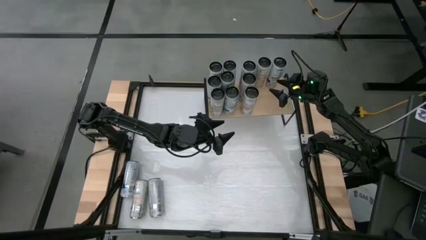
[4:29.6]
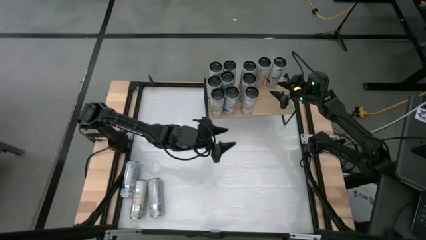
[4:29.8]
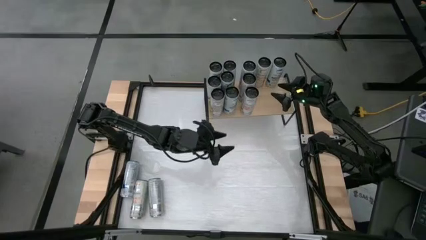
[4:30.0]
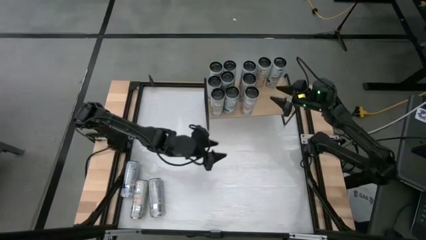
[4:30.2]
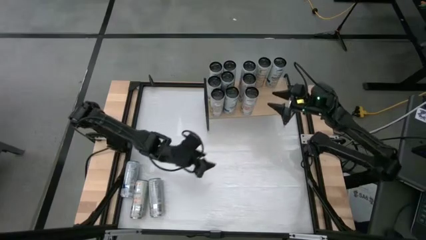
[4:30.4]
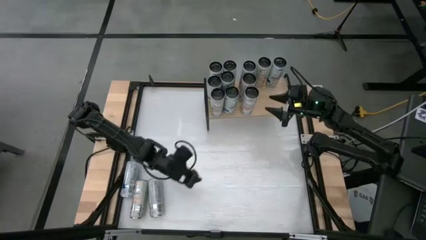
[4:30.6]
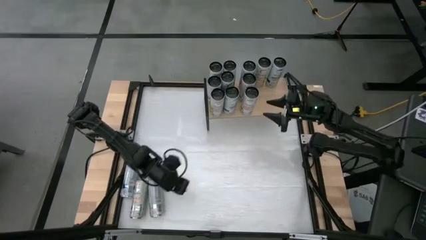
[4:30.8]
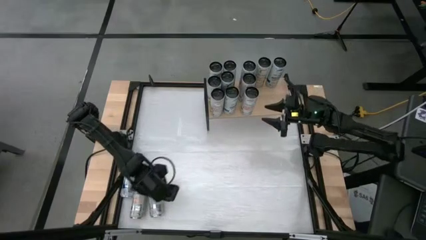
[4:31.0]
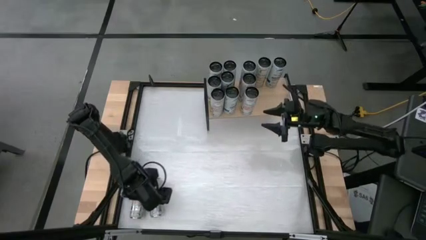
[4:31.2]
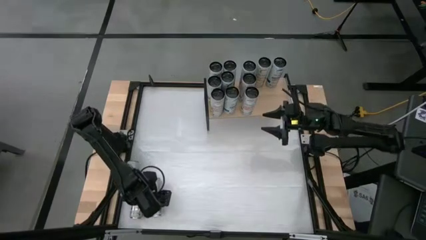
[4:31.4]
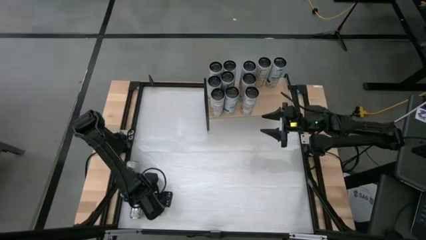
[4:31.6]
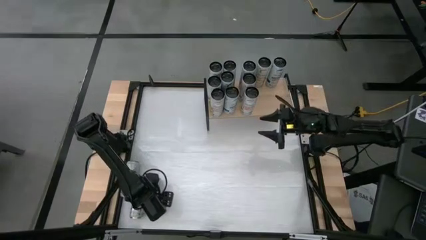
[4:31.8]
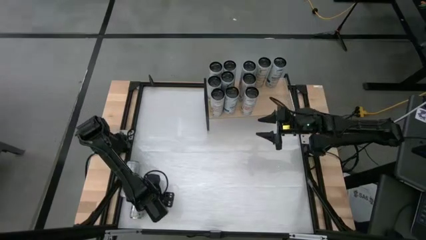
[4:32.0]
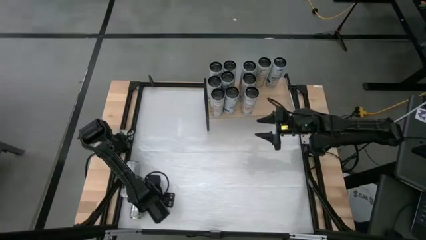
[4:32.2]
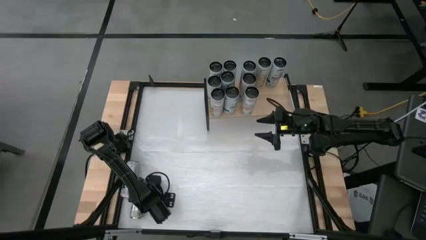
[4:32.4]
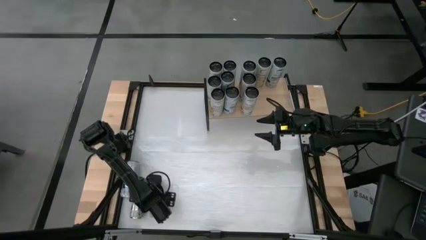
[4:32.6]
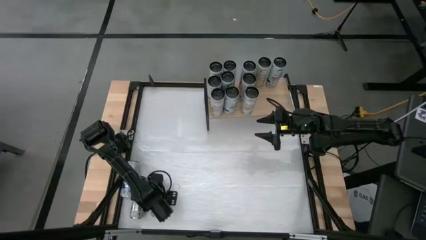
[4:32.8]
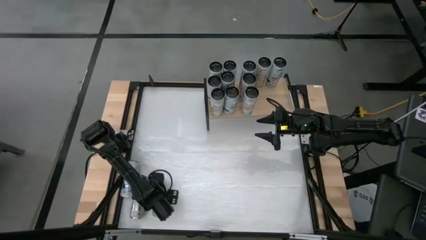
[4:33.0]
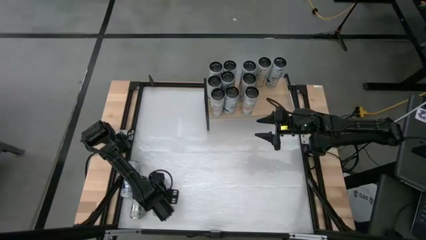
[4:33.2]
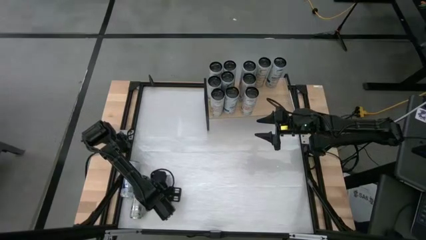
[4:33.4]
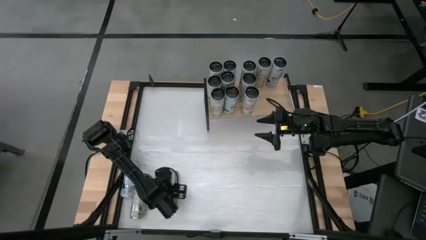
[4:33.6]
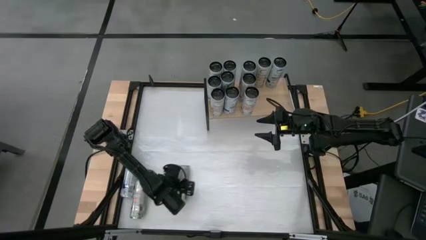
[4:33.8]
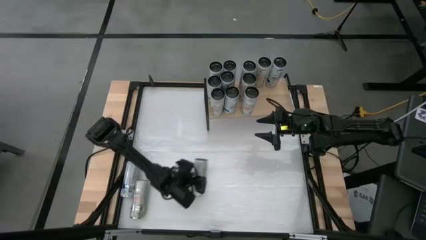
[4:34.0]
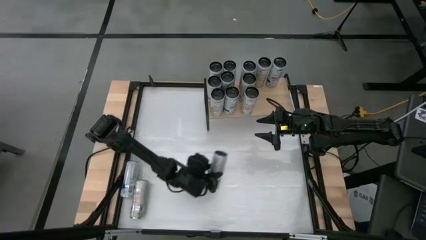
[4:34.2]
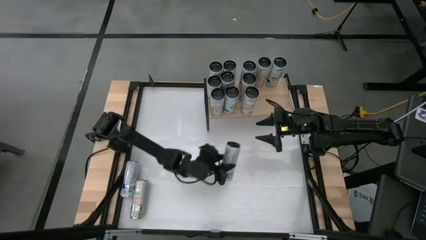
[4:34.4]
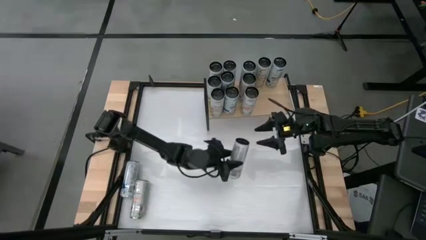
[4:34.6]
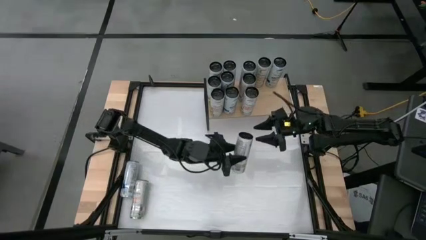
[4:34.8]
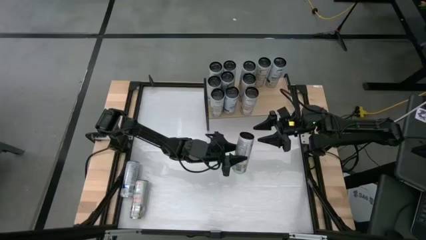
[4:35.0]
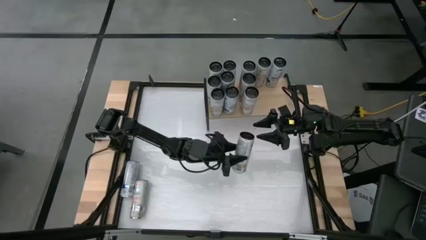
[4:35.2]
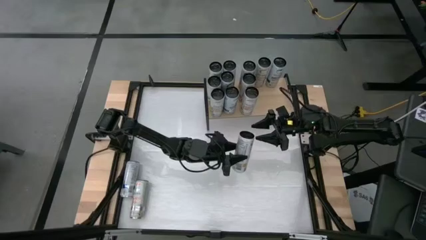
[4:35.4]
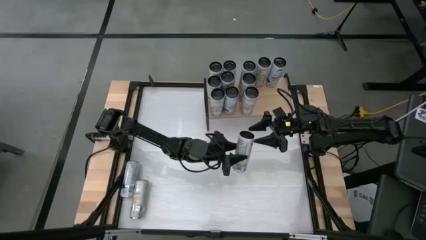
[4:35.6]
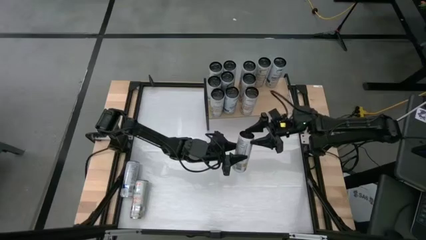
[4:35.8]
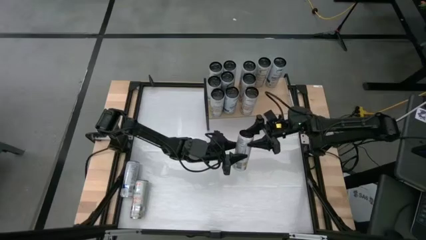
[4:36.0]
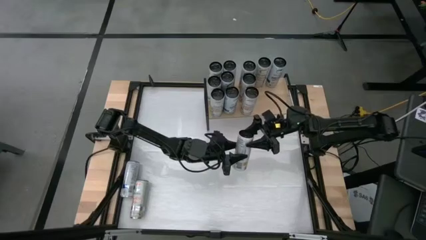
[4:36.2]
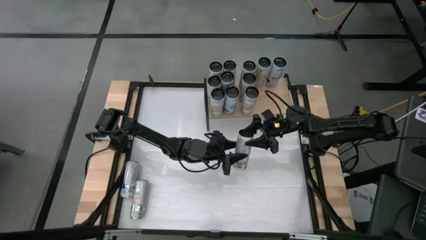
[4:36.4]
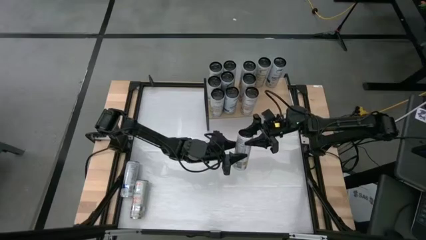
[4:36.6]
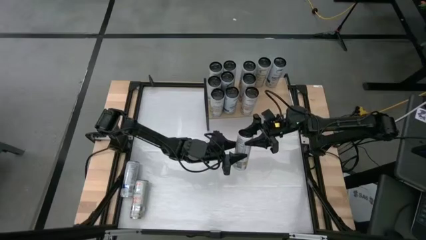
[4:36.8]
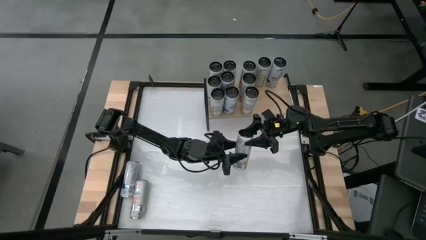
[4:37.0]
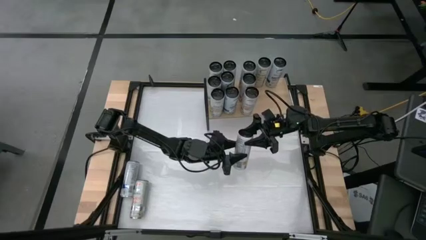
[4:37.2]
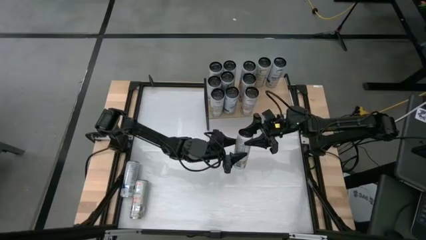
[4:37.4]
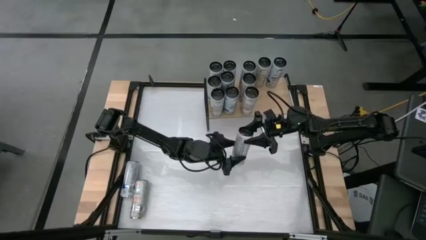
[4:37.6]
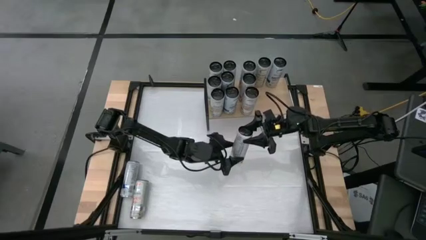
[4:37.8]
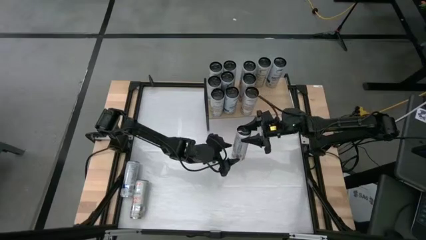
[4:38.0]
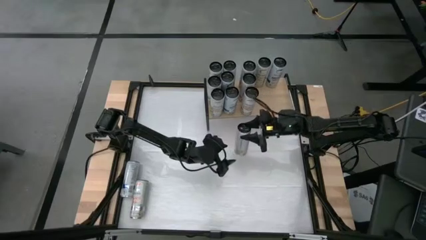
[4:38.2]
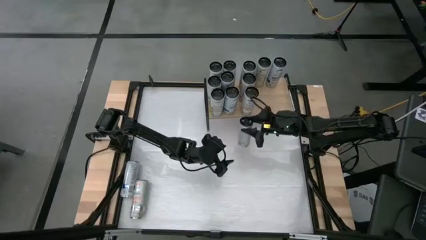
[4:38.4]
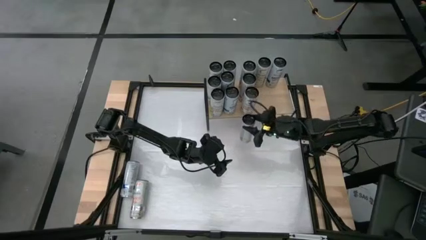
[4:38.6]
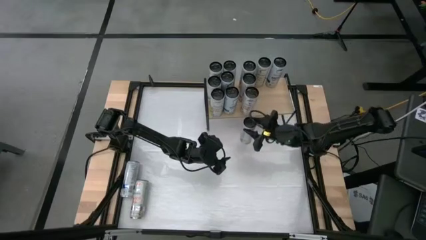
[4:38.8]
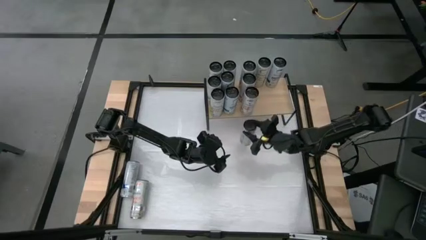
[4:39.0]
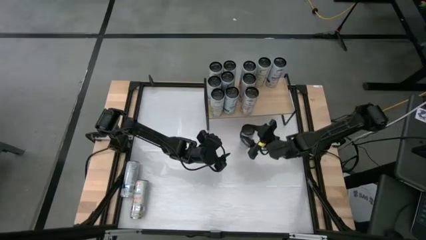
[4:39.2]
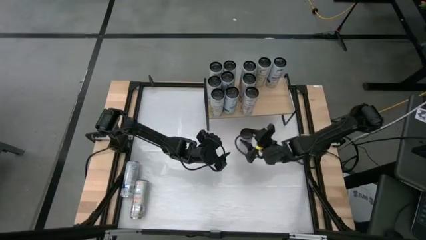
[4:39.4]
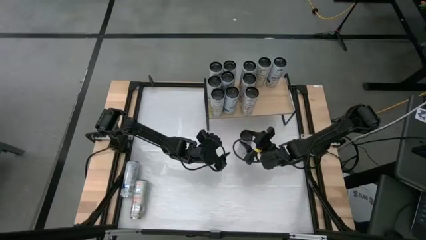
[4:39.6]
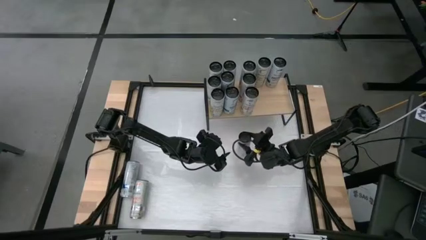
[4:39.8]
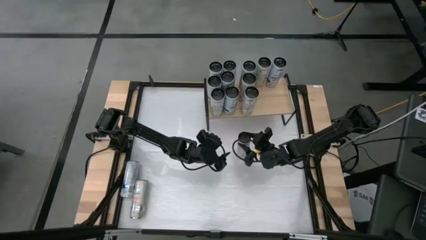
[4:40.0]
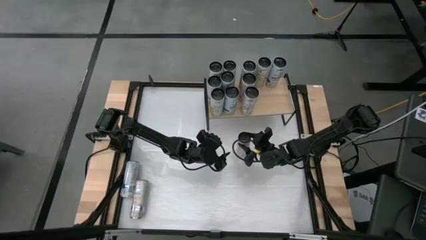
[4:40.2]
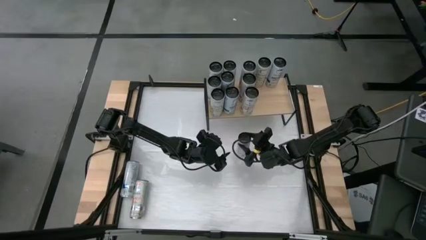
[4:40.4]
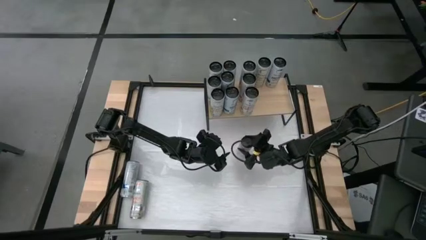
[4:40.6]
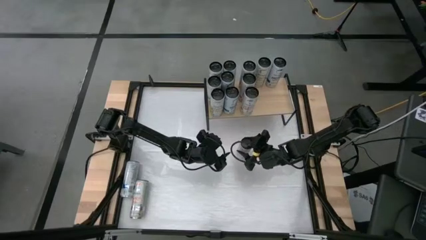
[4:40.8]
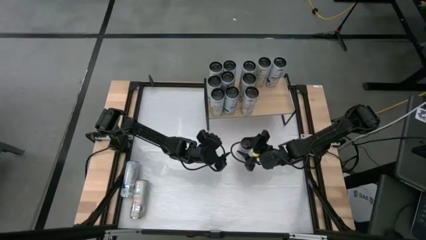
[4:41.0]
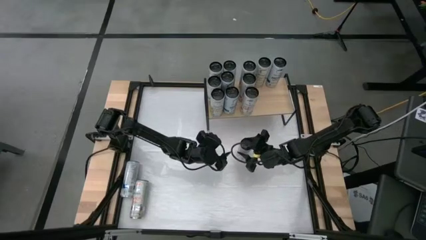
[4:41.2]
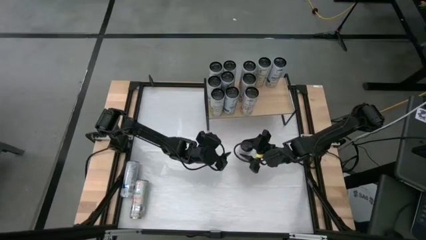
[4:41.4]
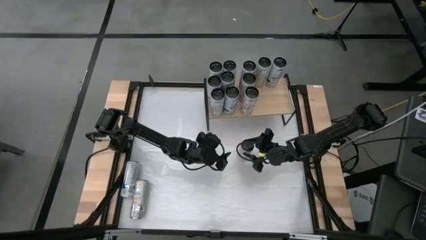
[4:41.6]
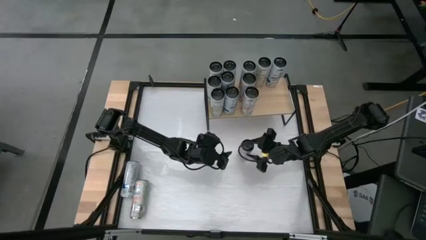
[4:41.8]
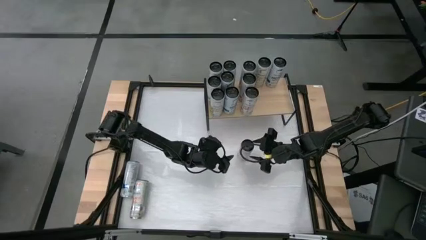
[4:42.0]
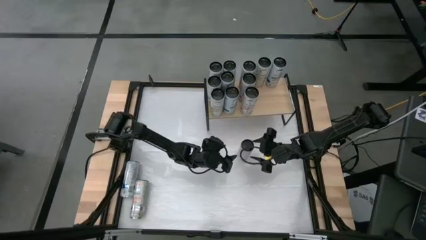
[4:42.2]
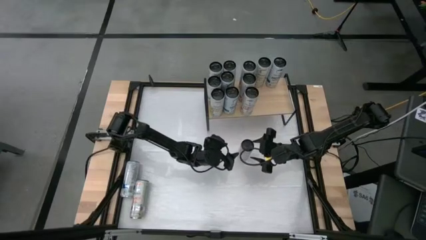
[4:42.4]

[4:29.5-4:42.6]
Task: Place canned beverage on shelf
Put the orange soda can on the shelf aligned with the orange soda can

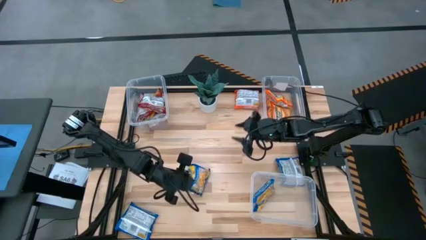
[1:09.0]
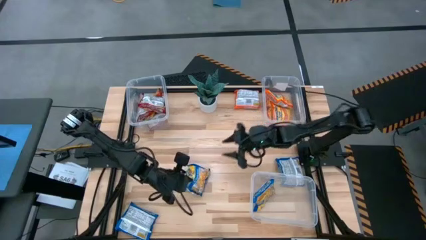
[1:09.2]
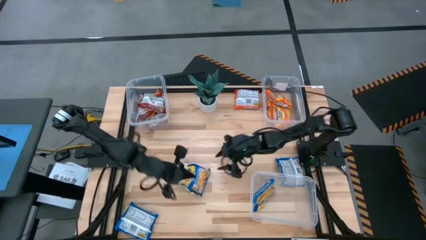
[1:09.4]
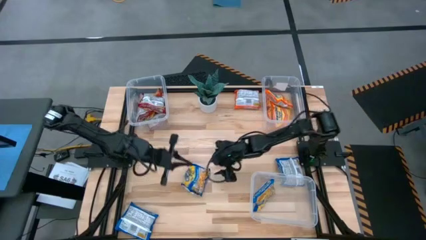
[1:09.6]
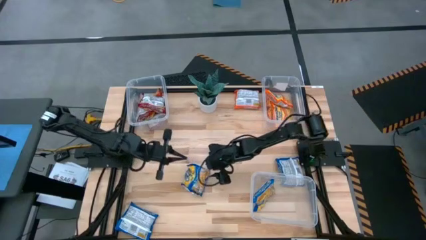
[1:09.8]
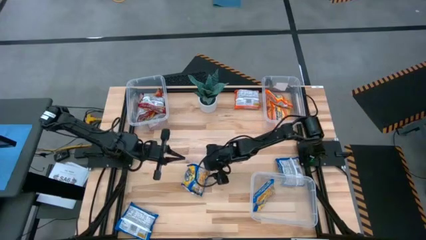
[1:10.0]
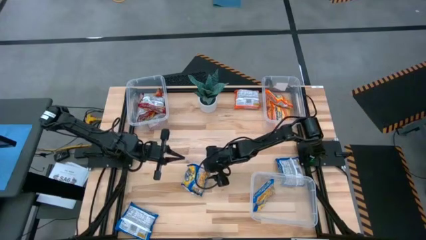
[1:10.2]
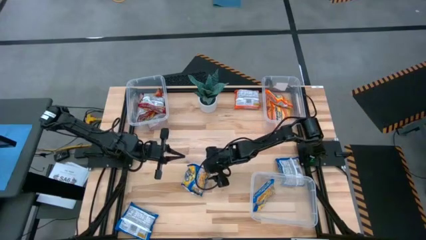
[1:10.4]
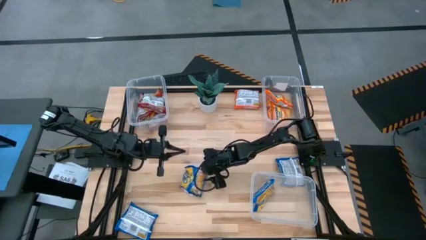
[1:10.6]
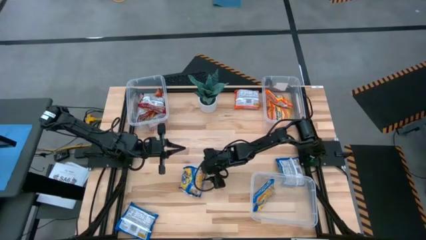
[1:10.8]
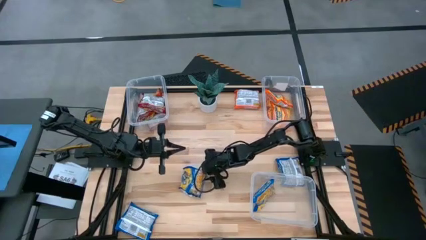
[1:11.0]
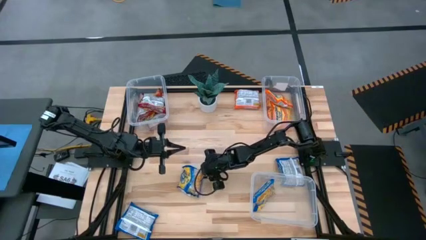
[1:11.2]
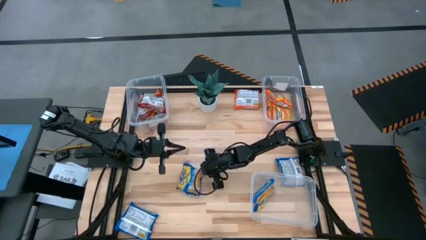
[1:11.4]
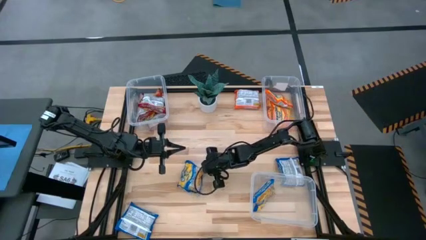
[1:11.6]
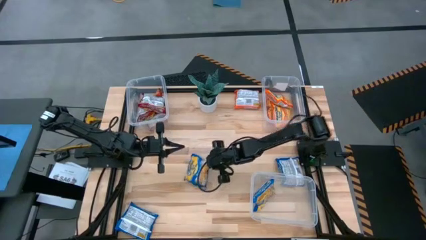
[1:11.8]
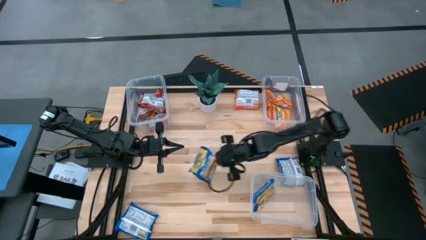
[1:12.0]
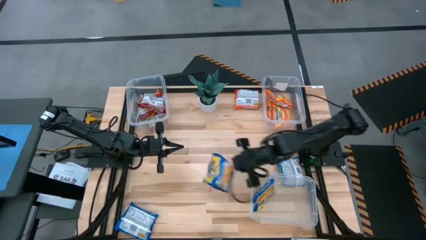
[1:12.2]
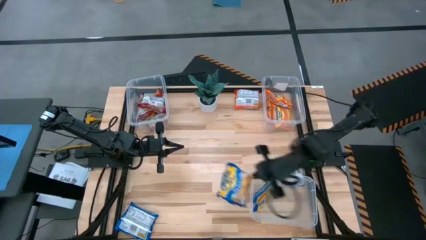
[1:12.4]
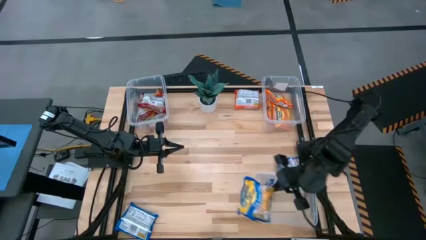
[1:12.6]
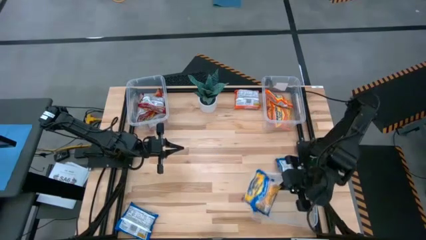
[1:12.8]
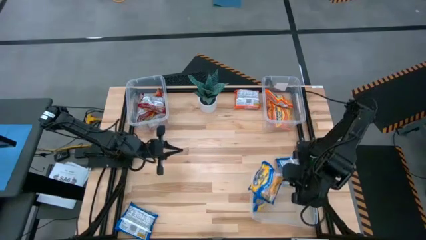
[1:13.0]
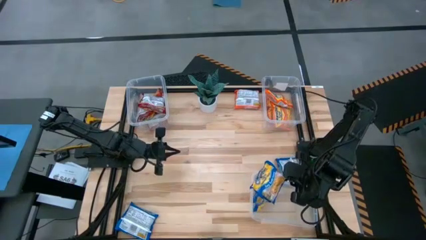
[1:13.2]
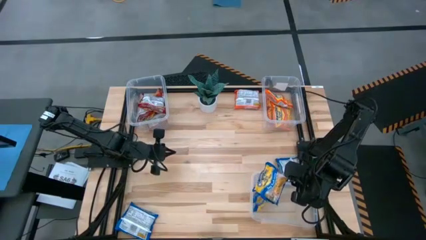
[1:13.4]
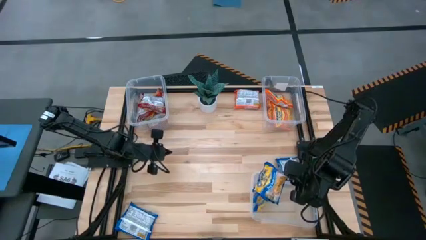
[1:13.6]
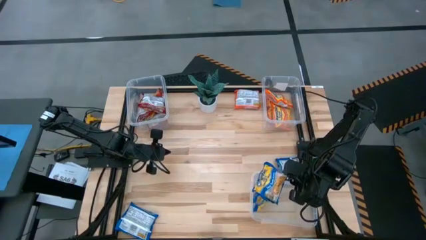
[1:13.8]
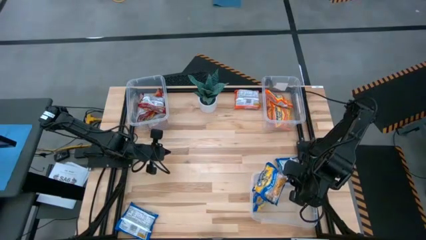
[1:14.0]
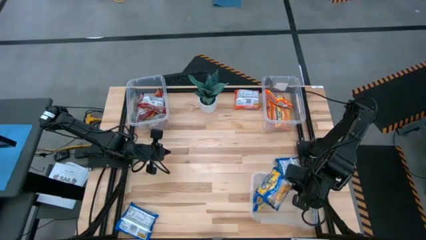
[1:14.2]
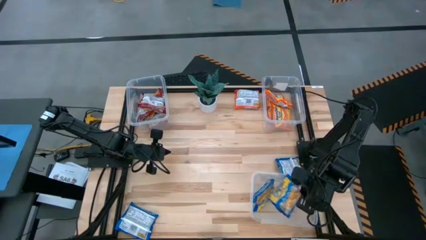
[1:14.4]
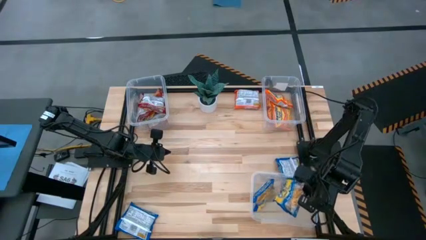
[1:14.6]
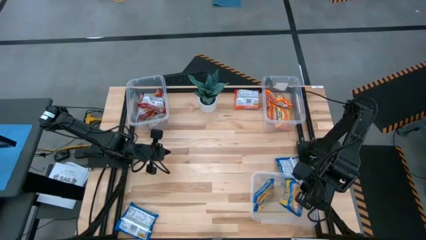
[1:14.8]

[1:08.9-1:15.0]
Task: Sort Maruchan noodles
Put the blue noodle pack in the bottom right transparent bin
